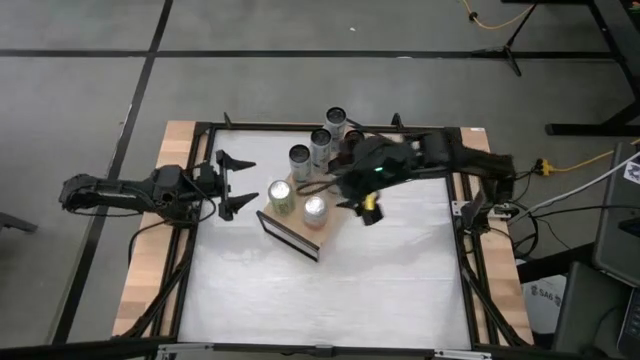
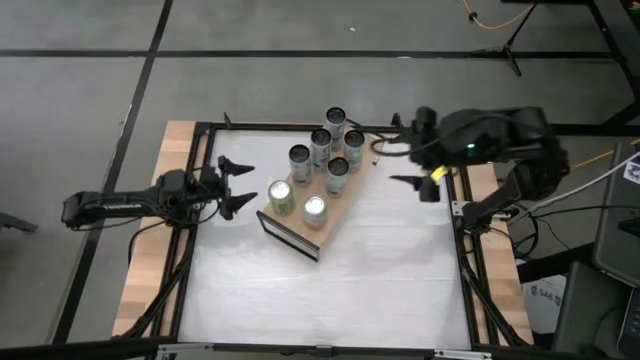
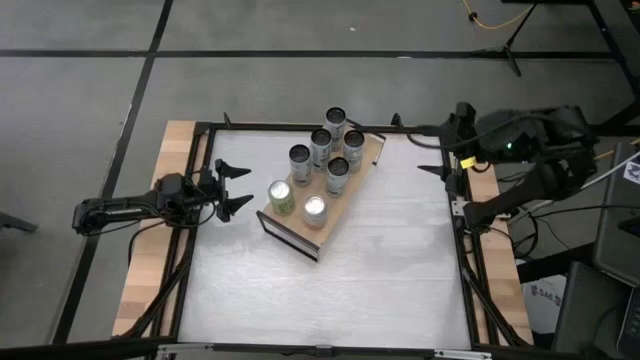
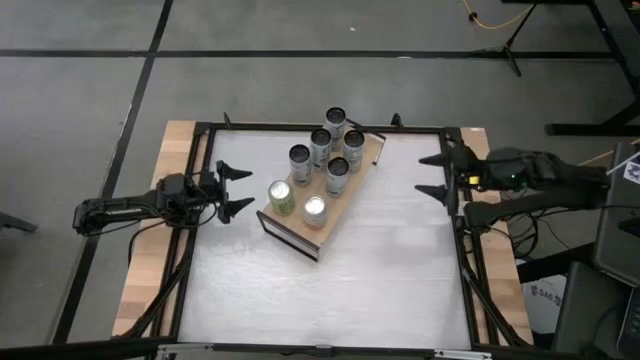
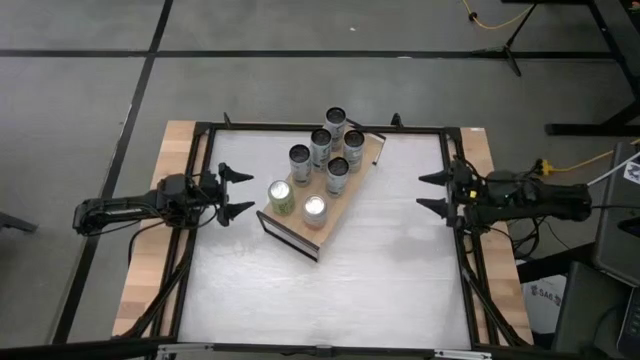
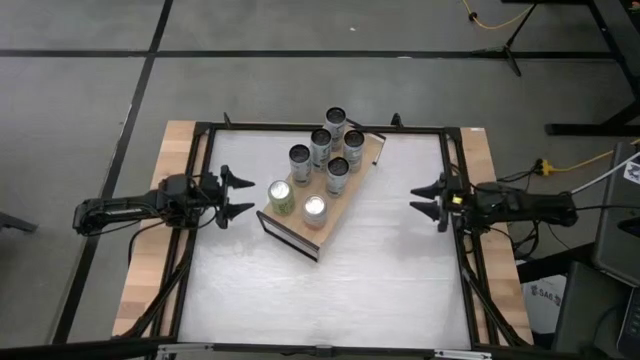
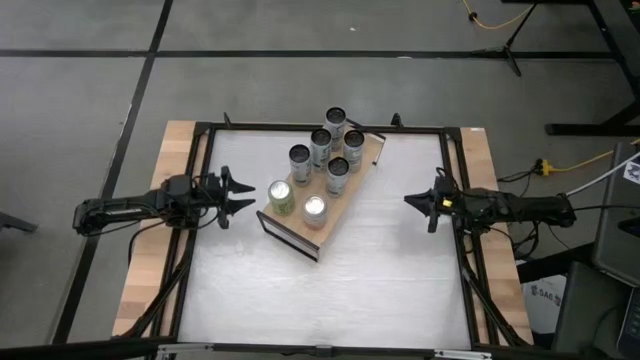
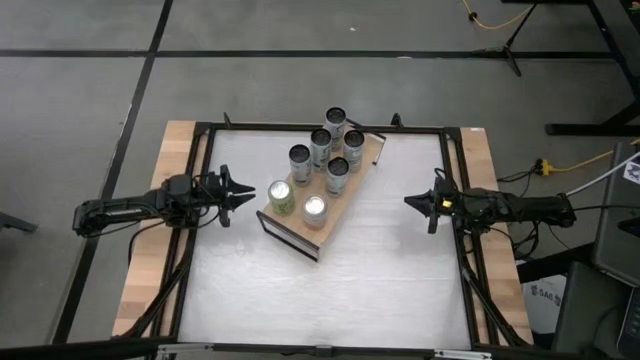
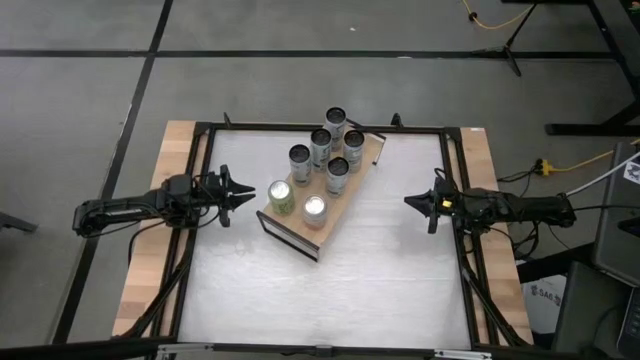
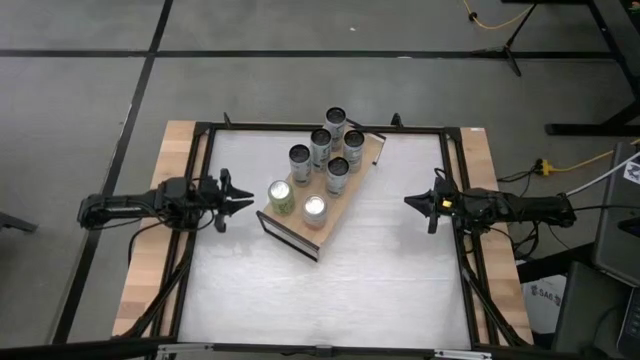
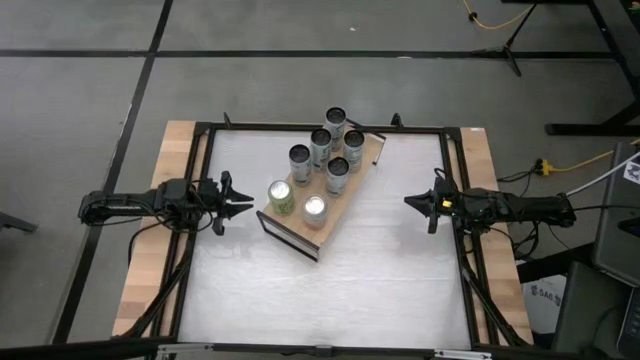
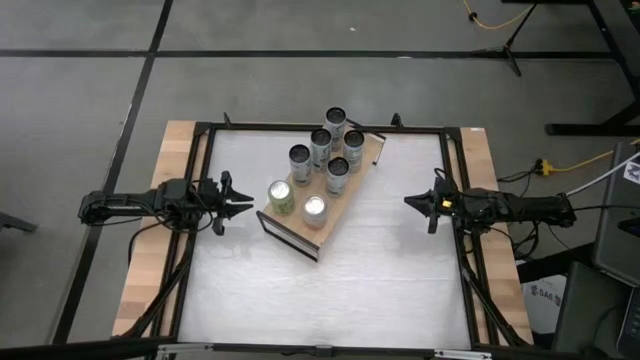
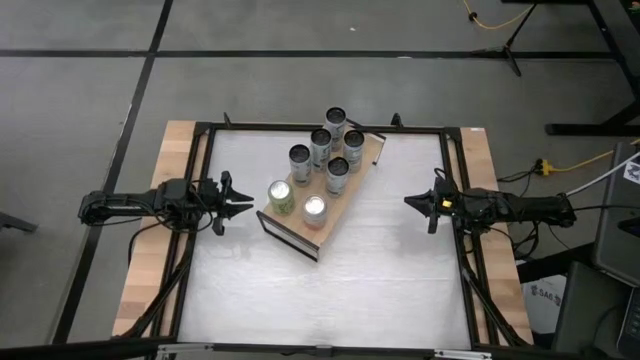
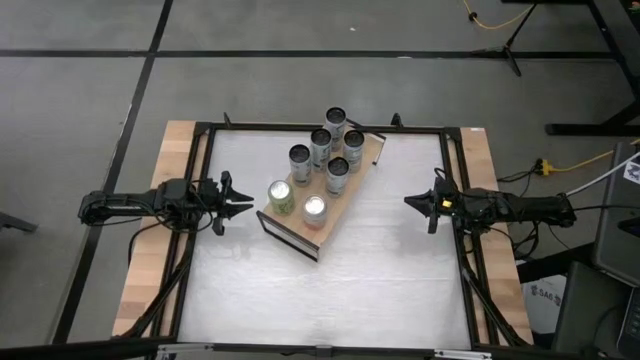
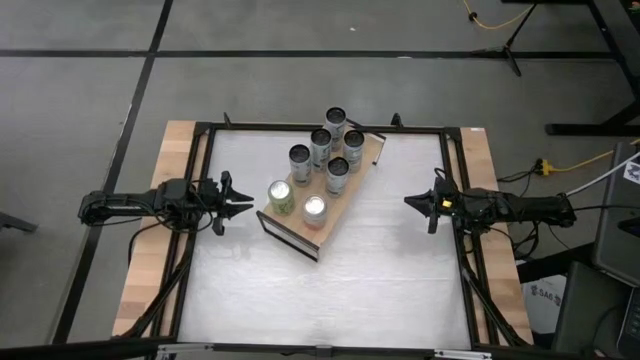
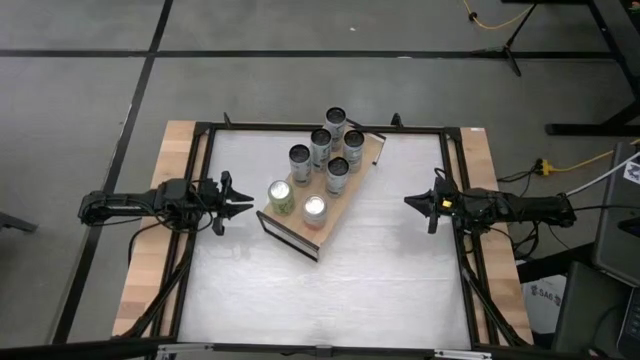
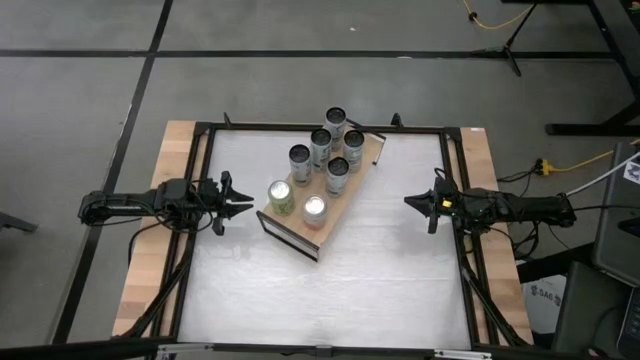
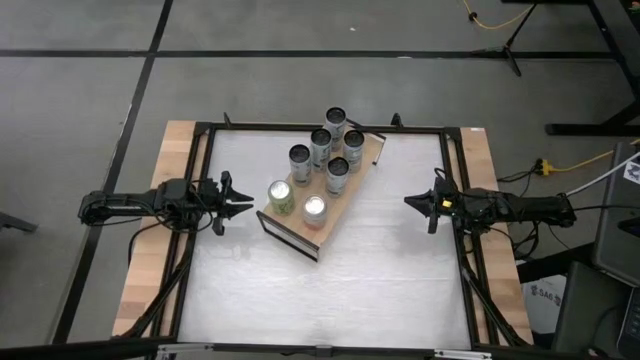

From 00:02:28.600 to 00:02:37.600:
Task: Place canned beverage on shelf
Return to Home Position

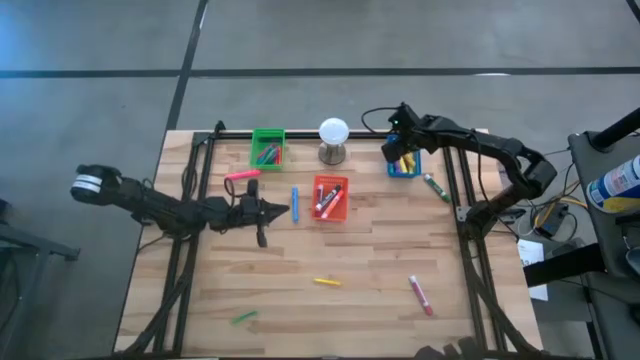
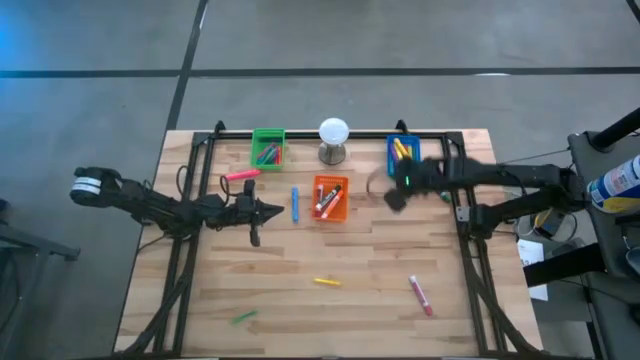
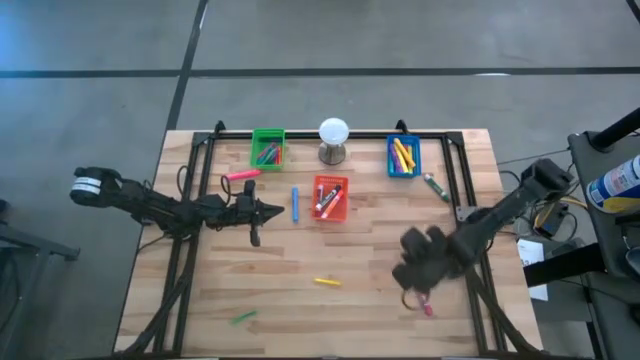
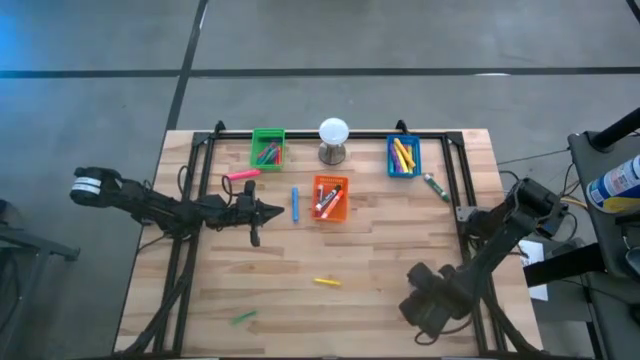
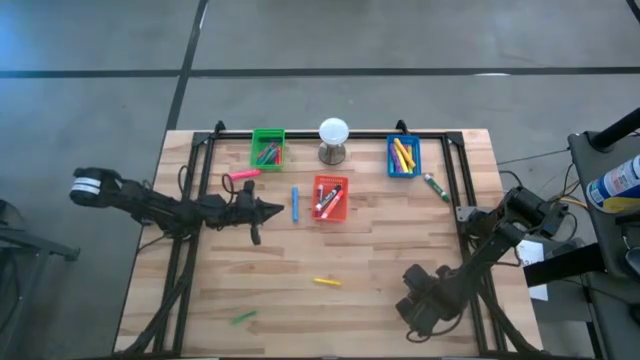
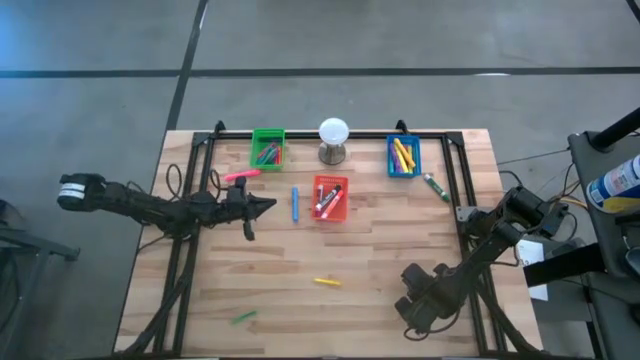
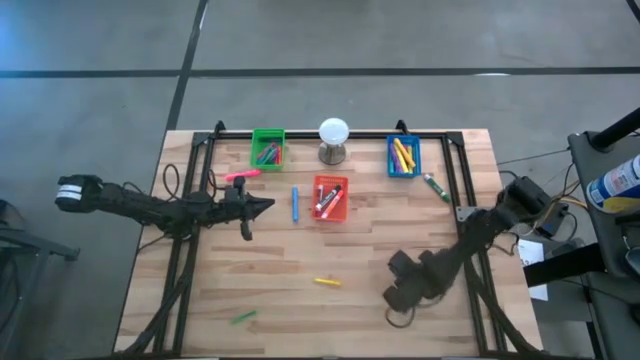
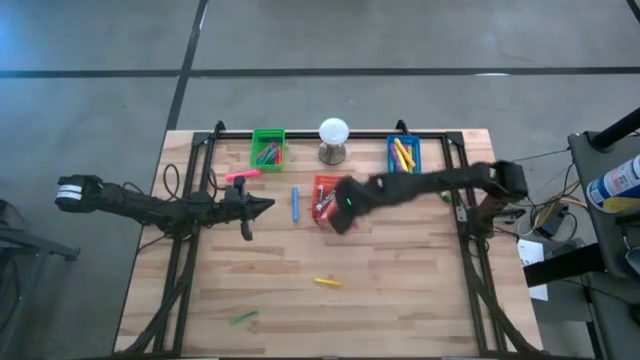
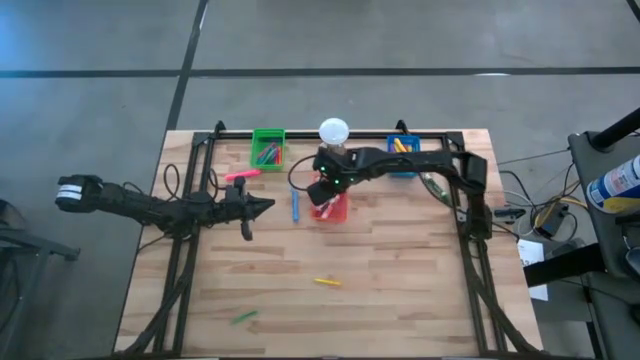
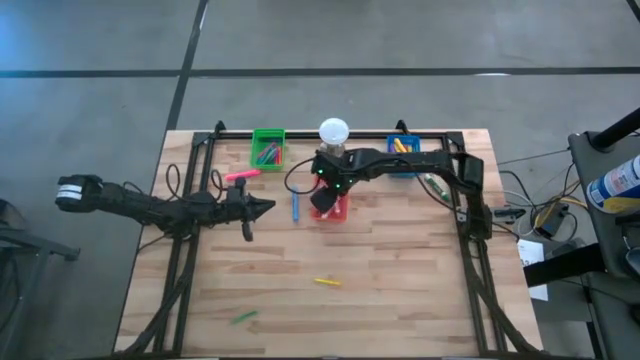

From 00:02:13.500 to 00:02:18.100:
Task: Pick & Place Markers
Put the pink marker into the orange bin

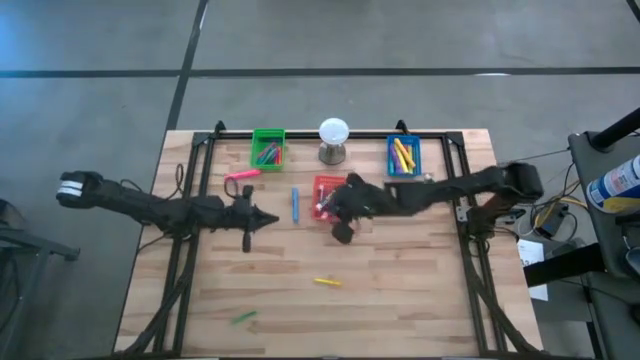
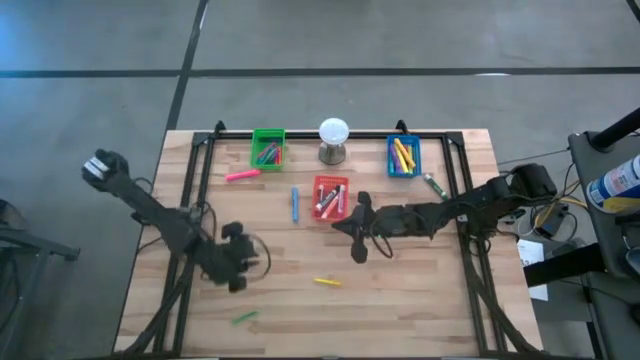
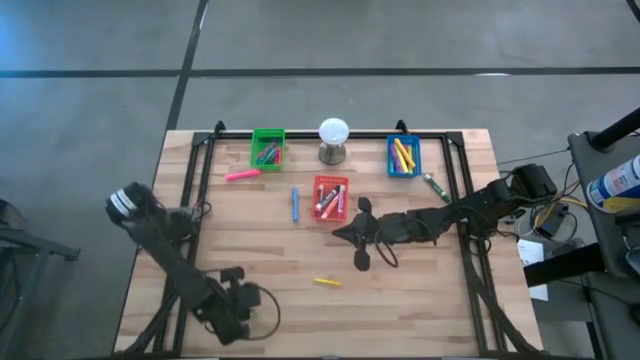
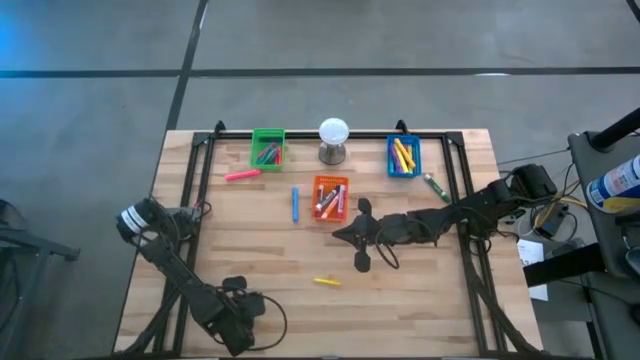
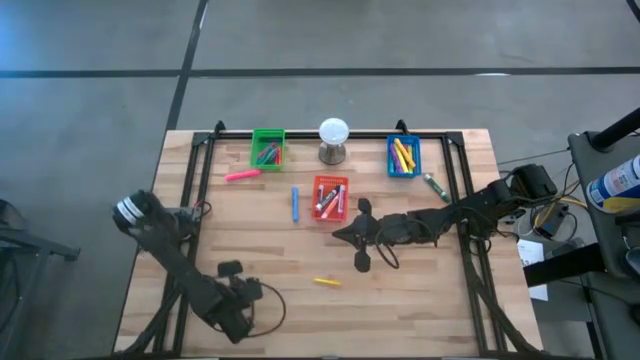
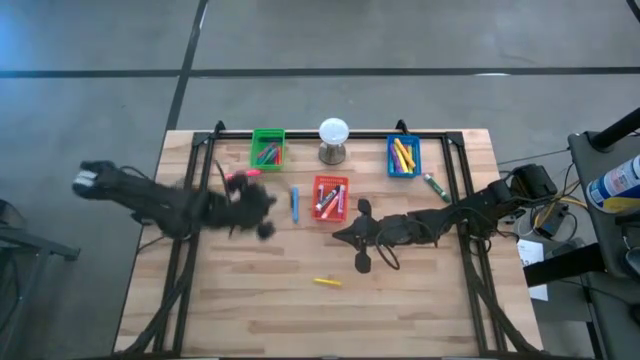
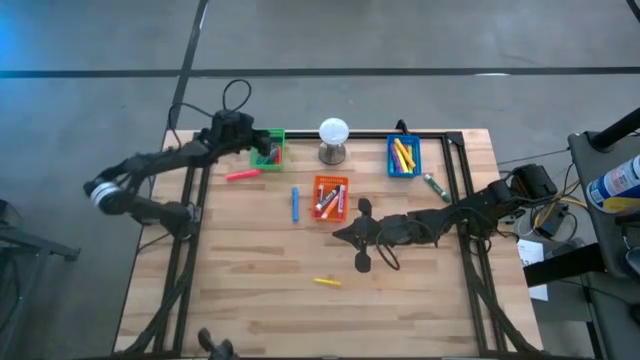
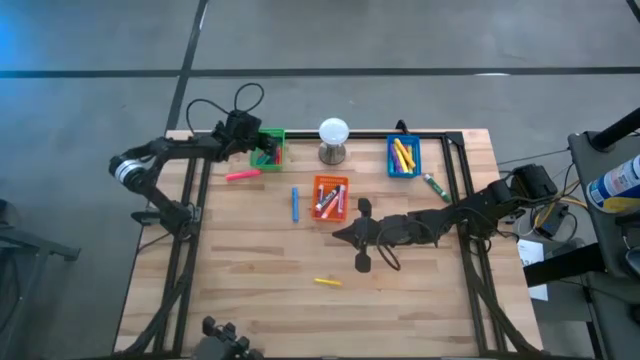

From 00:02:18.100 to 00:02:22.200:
Put the green pen into the green bin
